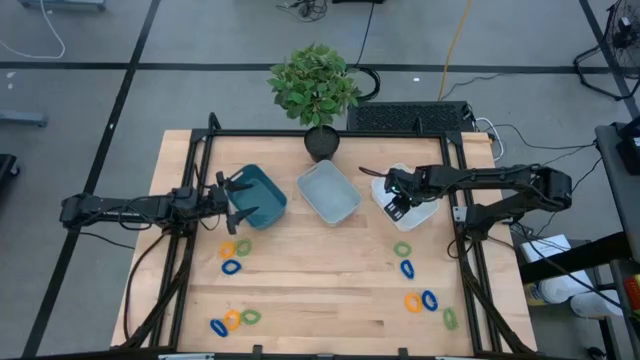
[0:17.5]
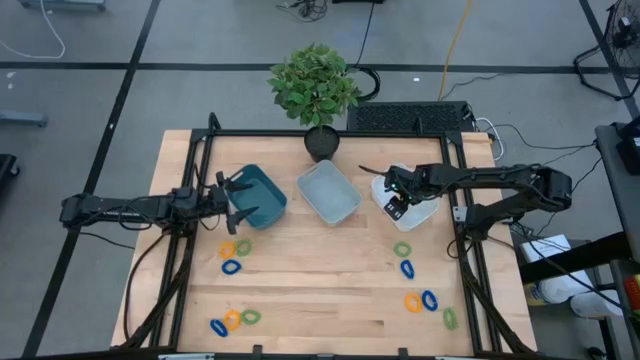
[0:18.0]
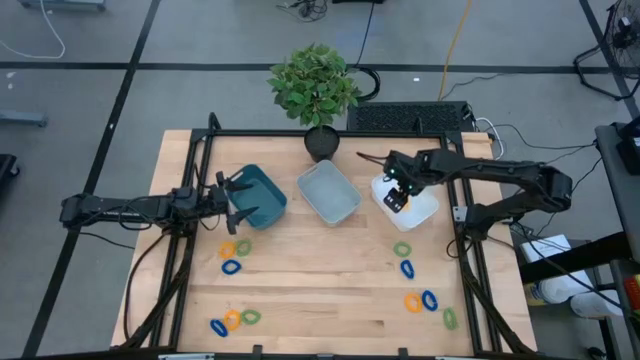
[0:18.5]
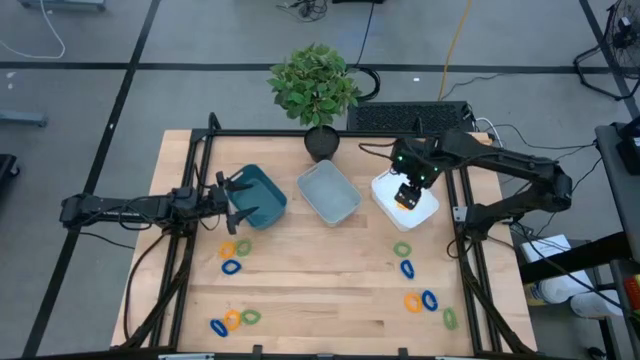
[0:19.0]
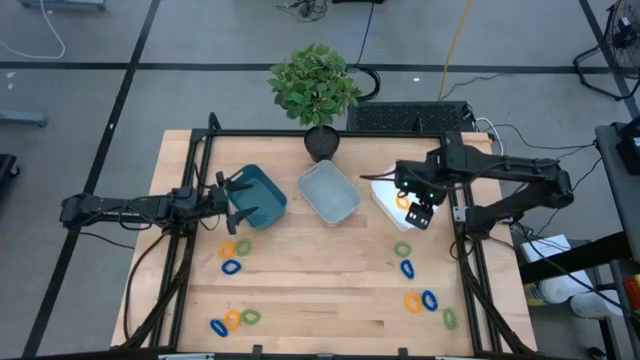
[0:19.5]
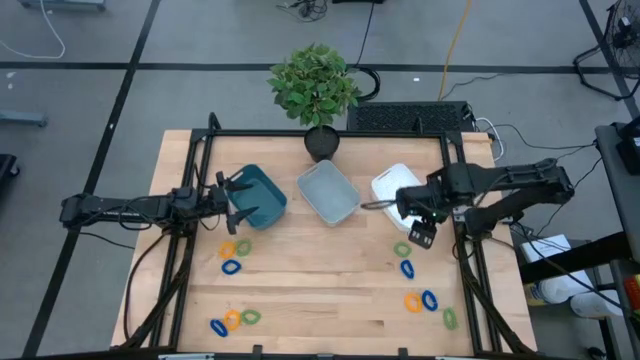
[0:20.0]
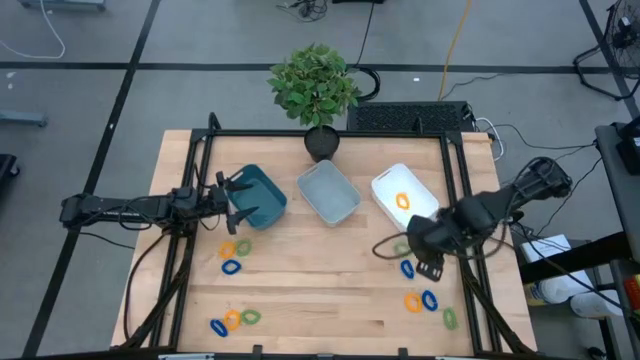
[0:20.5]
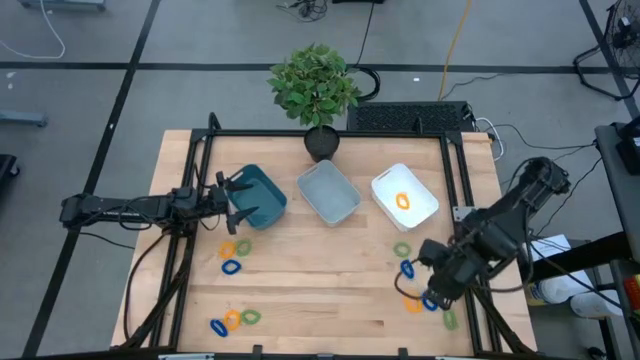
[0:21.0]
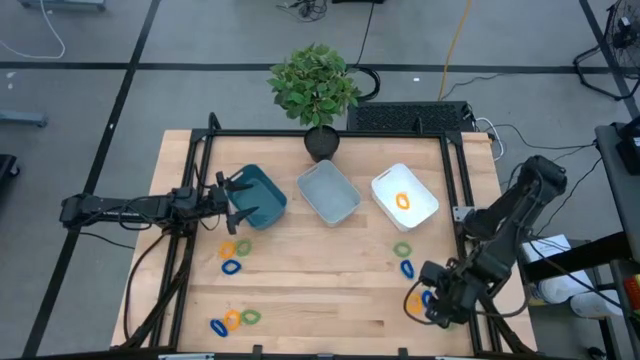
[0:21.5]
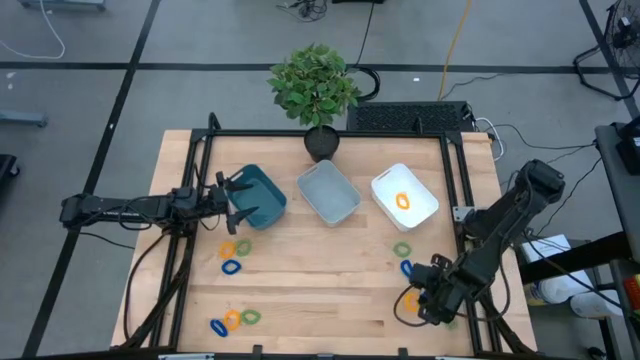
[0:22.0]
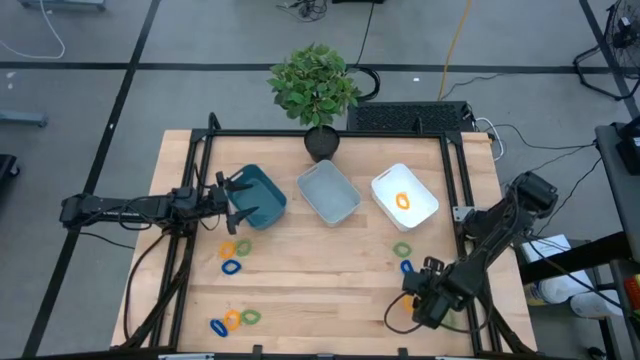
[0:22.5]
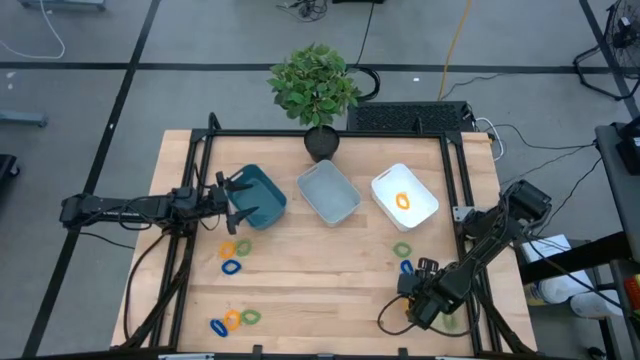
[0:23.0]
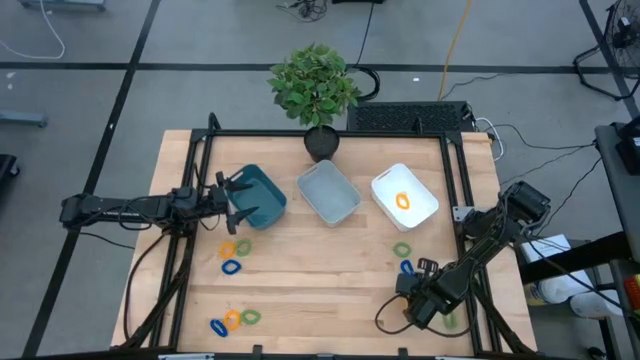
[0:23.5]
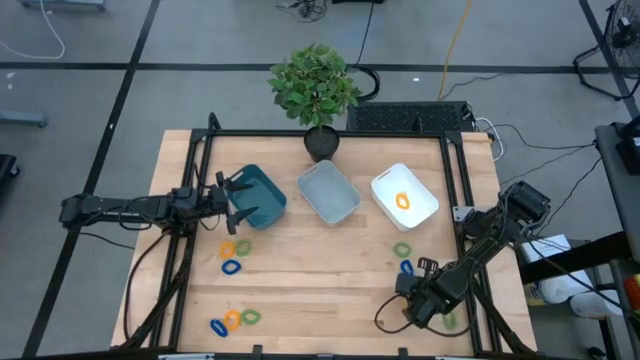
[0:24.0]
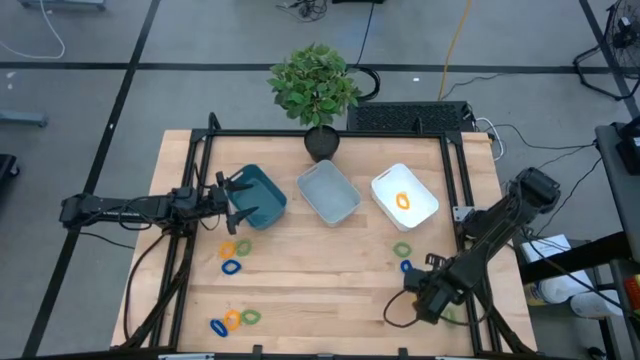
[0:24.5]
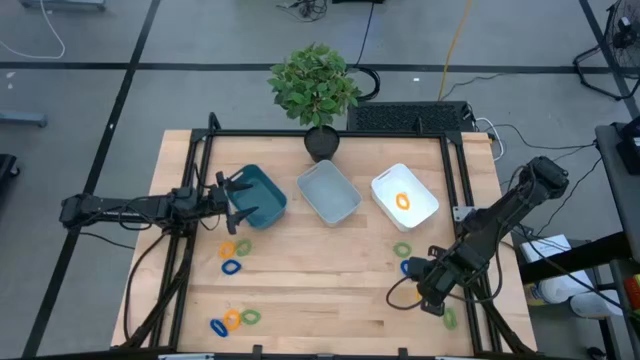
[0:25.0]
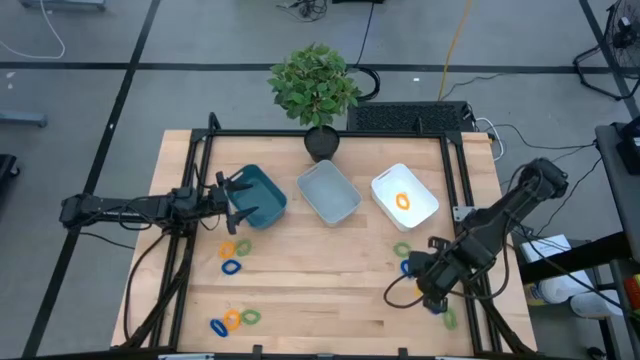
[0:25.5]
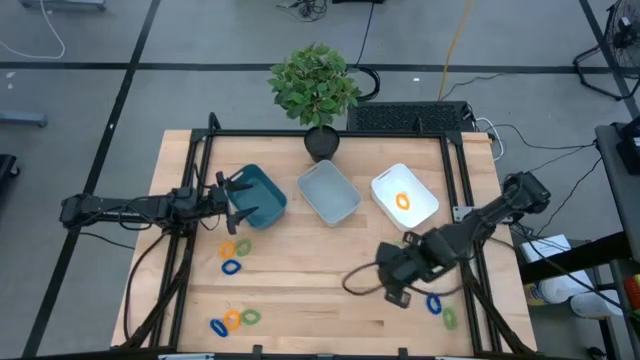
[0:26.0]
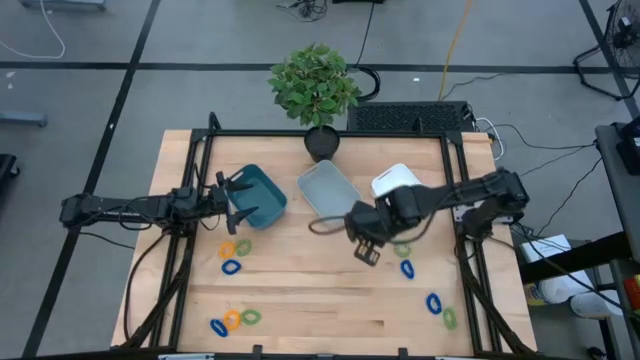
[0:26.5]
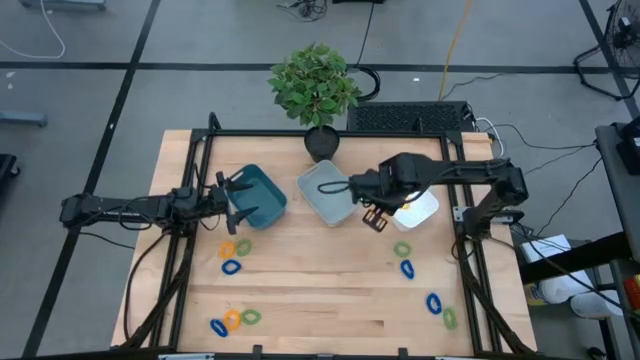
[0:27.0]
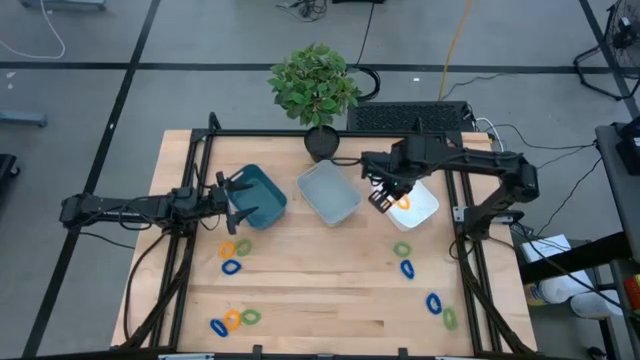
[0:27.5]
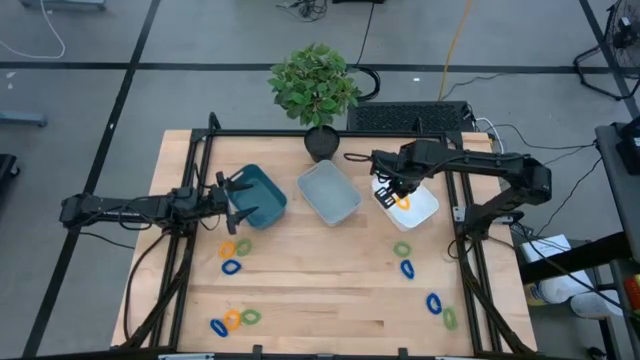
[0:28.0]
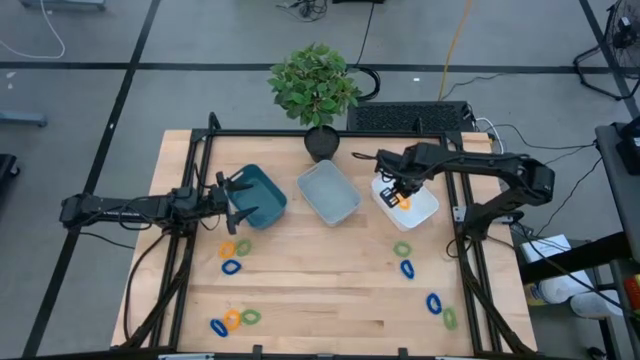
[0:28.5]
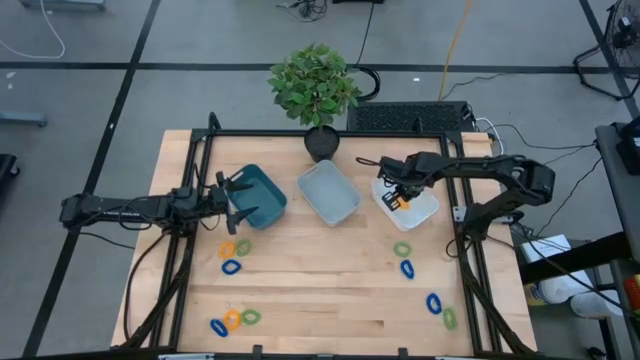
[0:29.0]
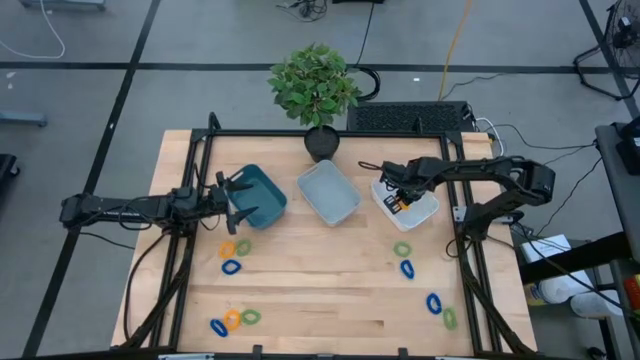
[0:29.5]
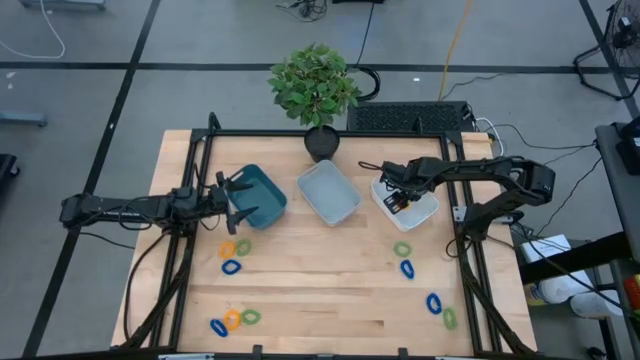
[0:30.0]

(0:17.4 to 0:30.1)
Task: Sort spring keychains
Put the bottom right yellow spring keychain into the white bin

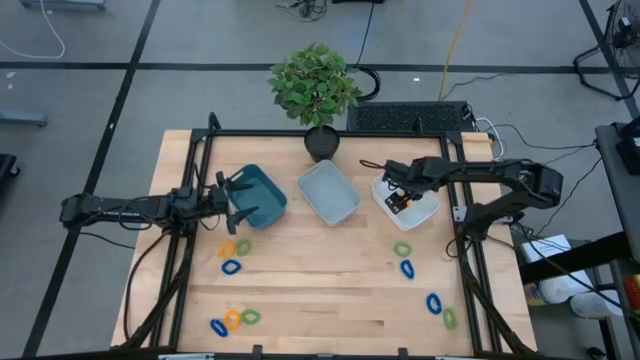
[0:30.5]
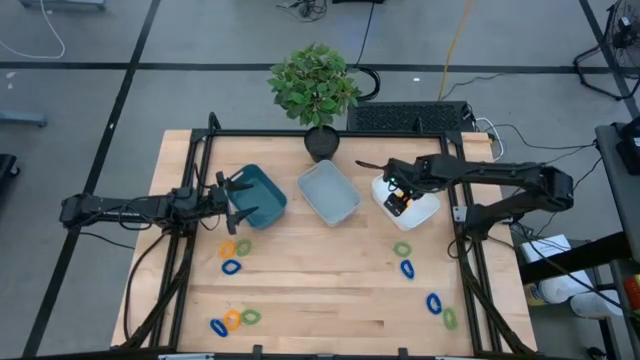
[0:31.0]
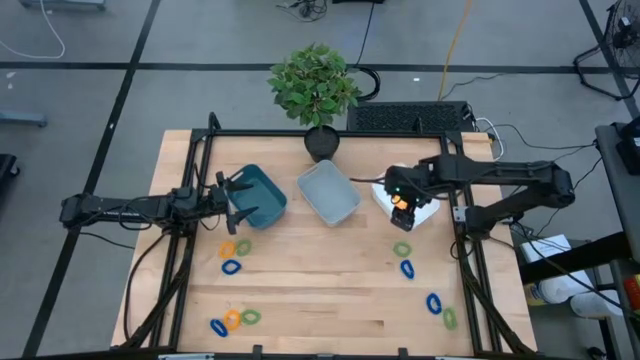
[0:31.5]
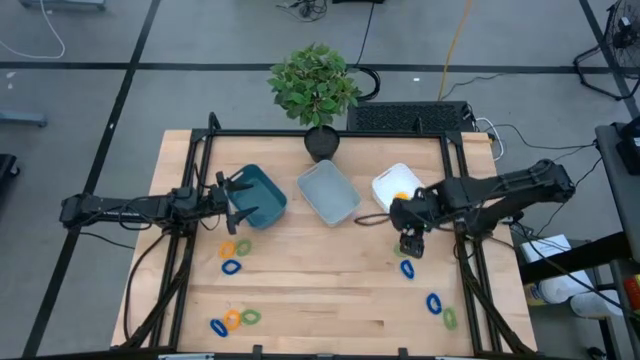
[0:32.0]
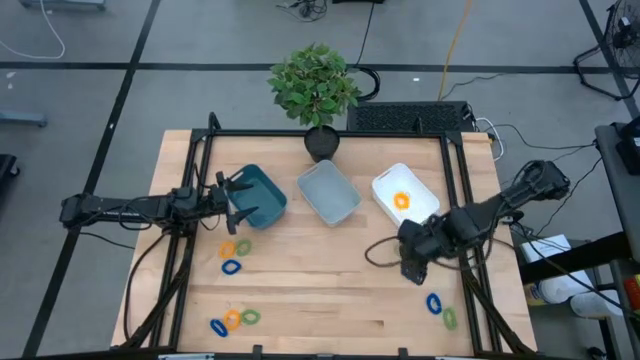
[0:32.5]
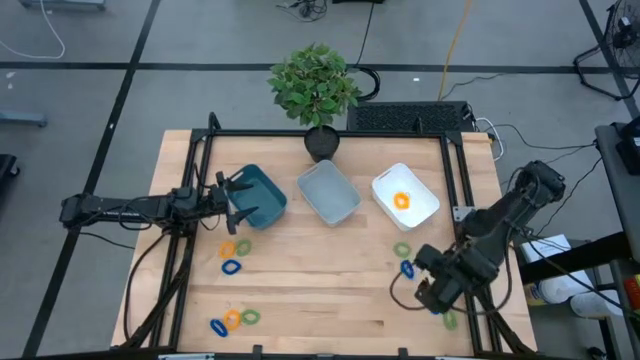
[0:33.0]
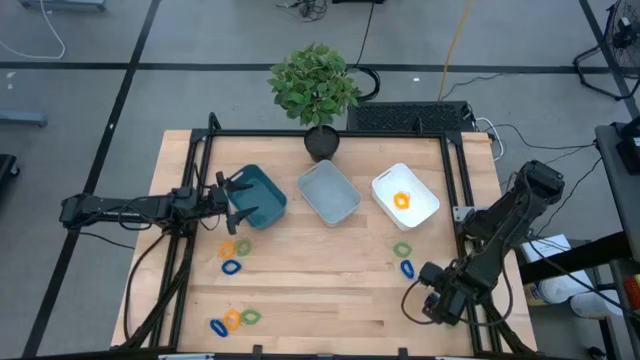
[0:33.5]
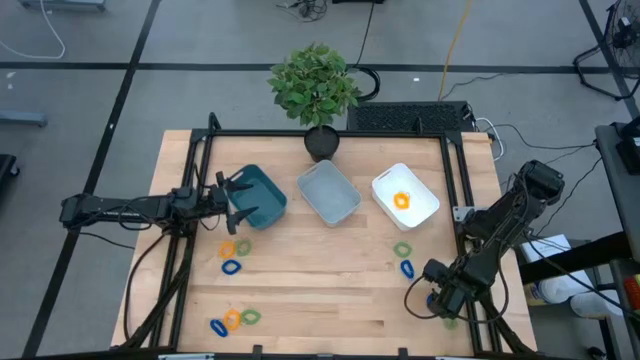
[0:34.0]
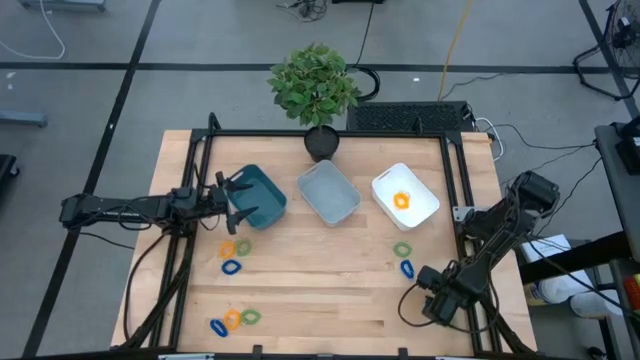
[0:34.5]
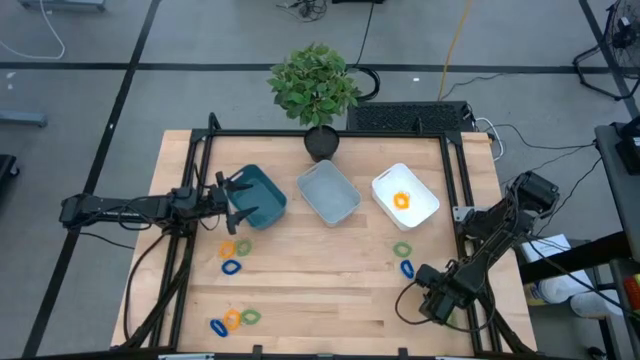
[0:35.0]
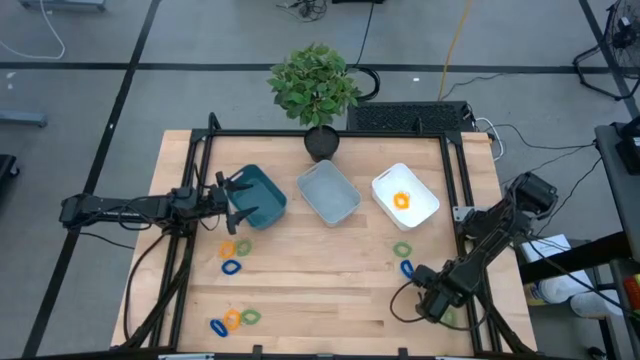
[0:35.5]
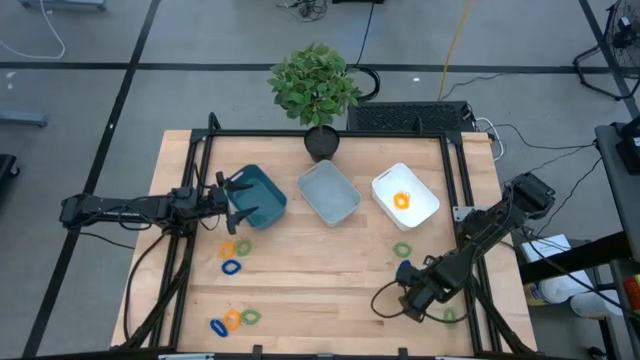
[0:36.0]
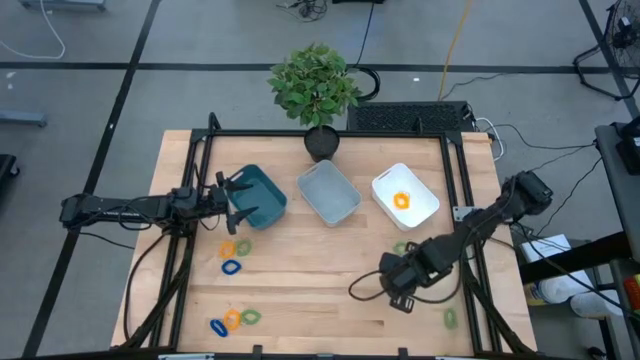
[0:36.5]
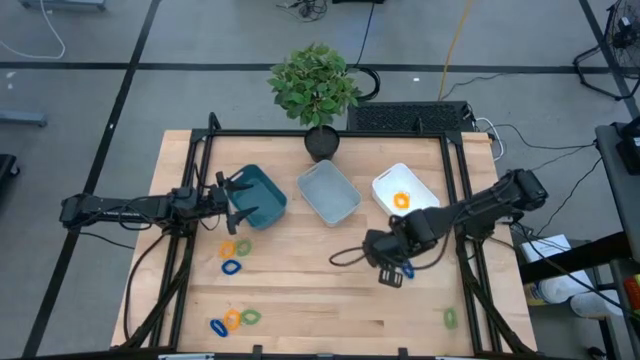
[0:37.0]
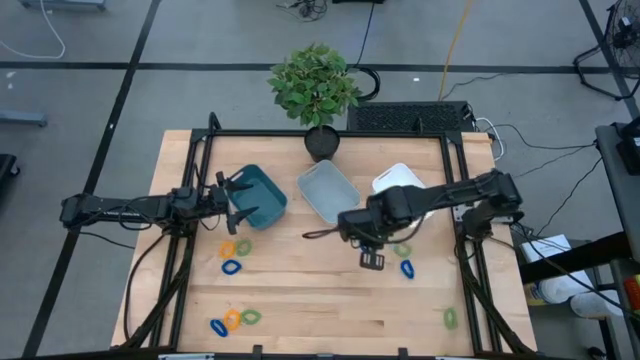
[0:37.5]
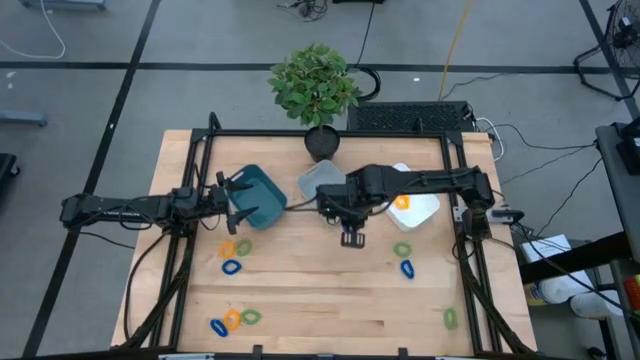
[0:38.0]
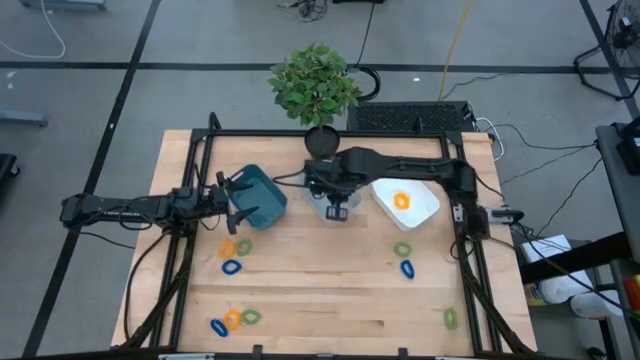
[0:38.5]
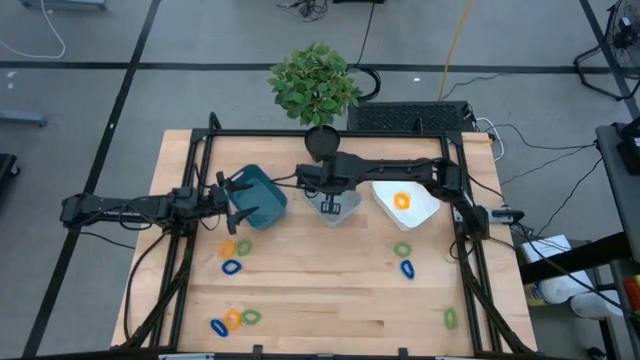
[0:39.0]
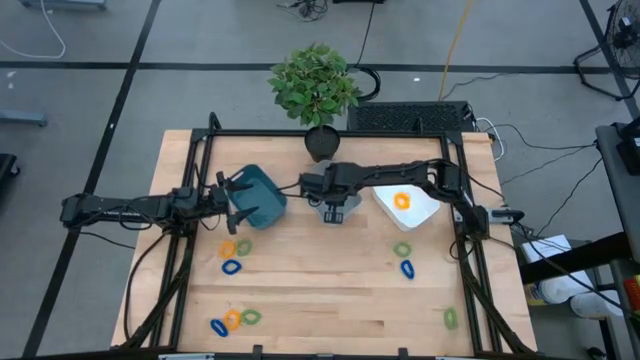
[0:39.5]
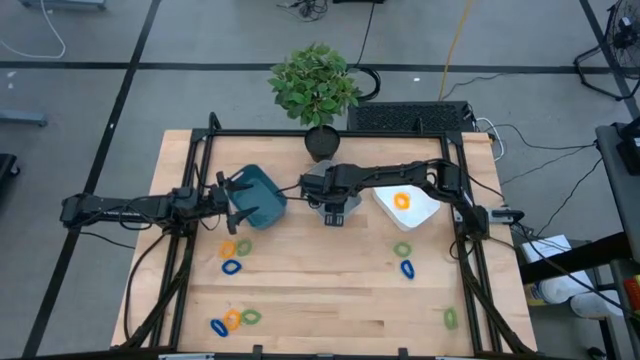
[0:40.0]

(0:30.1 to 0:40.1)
Put the bottom right blue spring keychain into the gray bin
